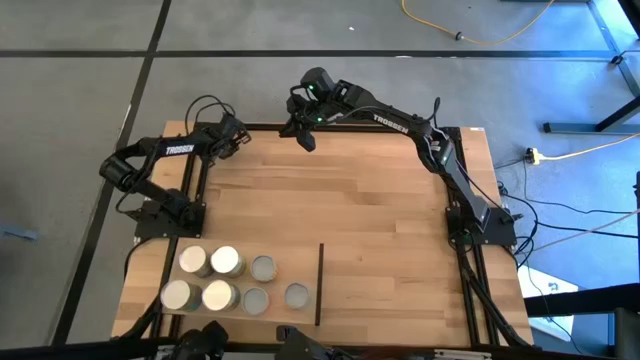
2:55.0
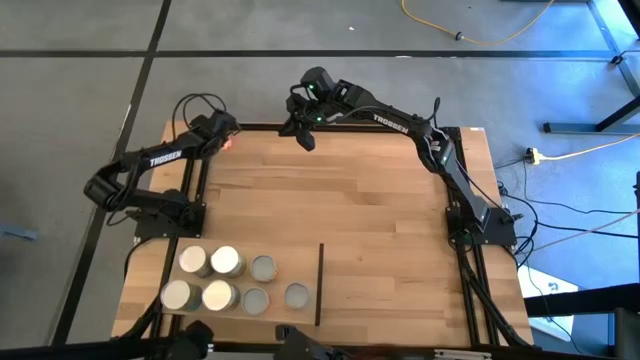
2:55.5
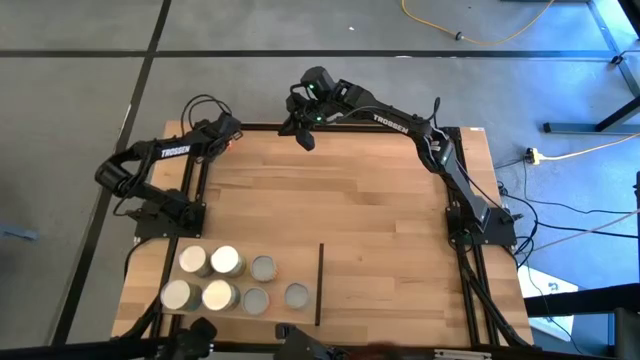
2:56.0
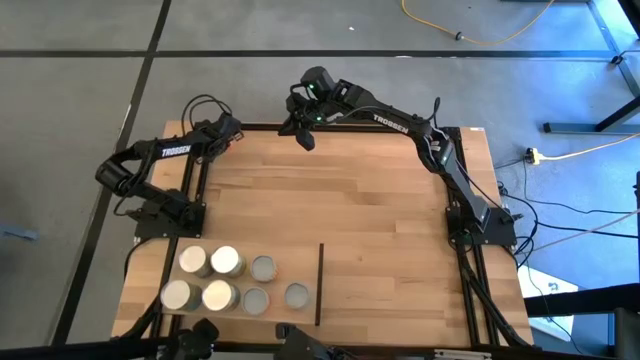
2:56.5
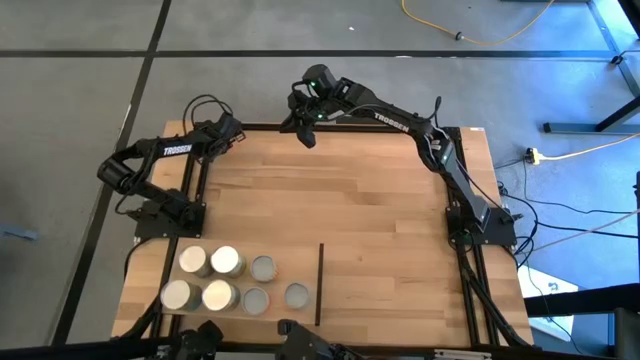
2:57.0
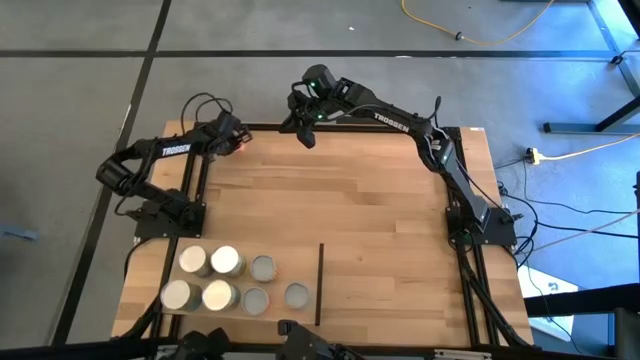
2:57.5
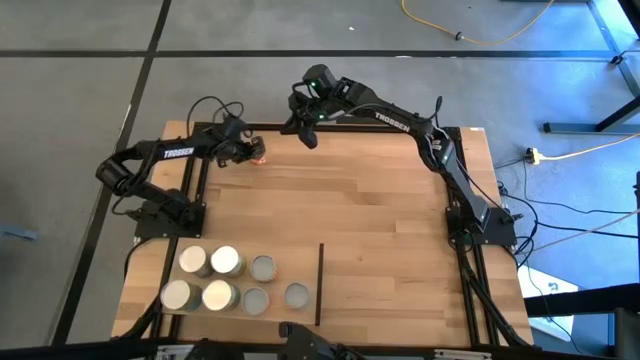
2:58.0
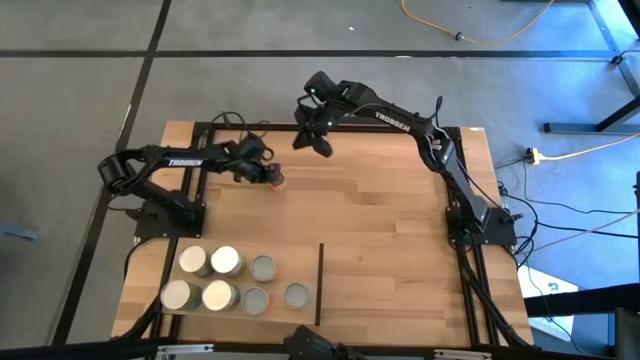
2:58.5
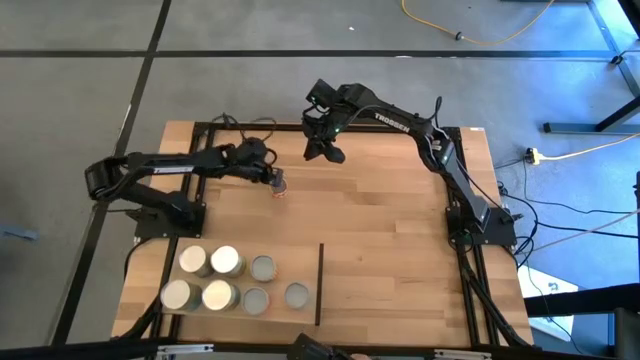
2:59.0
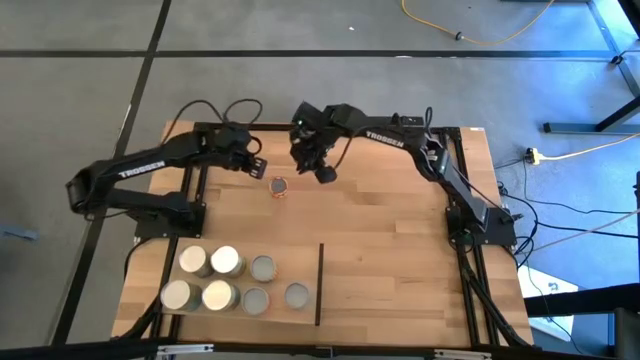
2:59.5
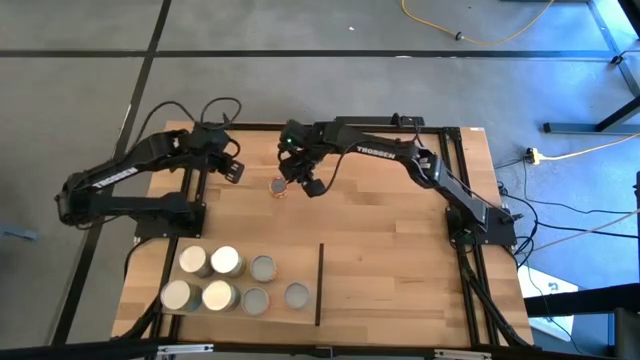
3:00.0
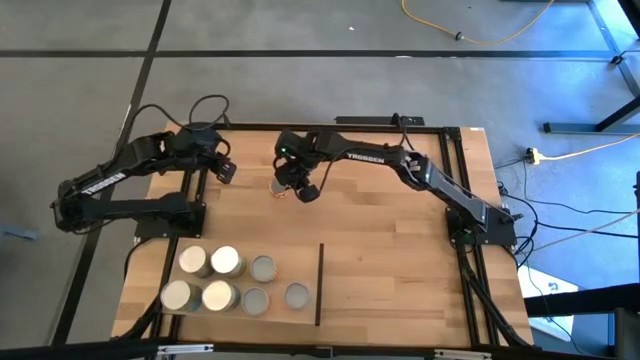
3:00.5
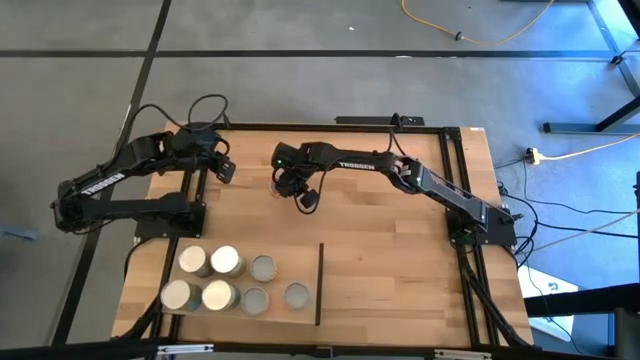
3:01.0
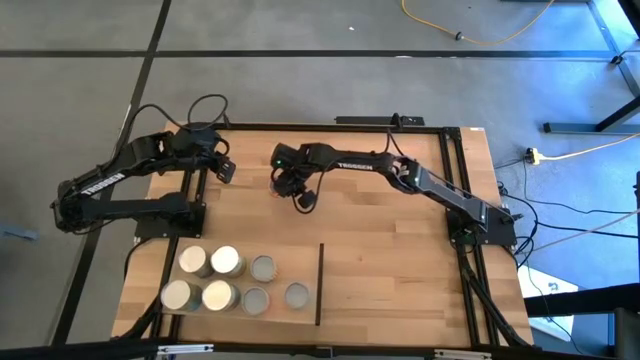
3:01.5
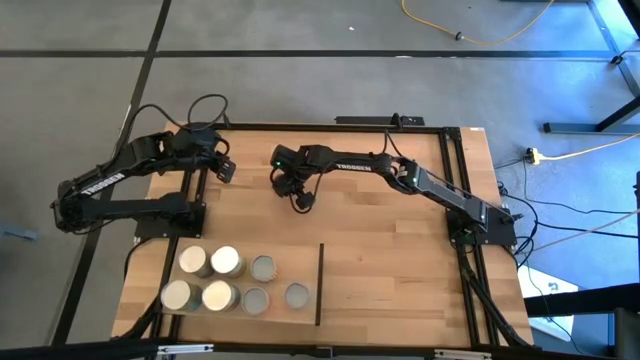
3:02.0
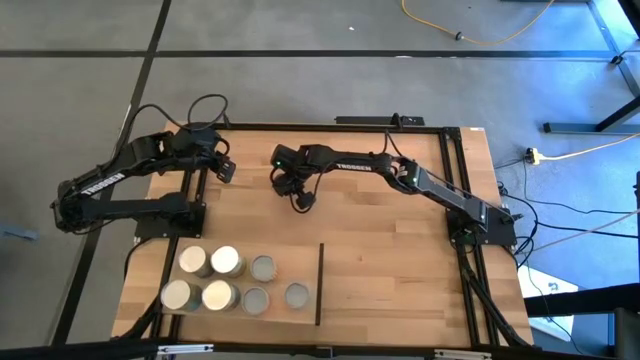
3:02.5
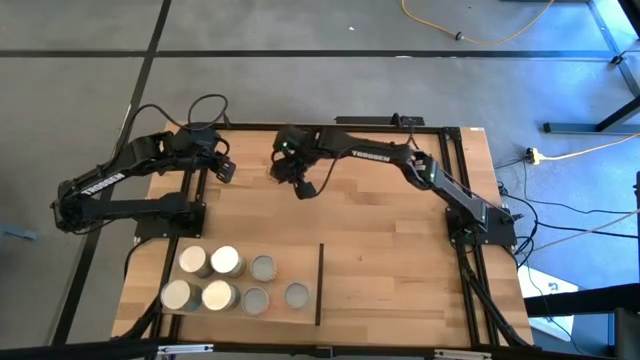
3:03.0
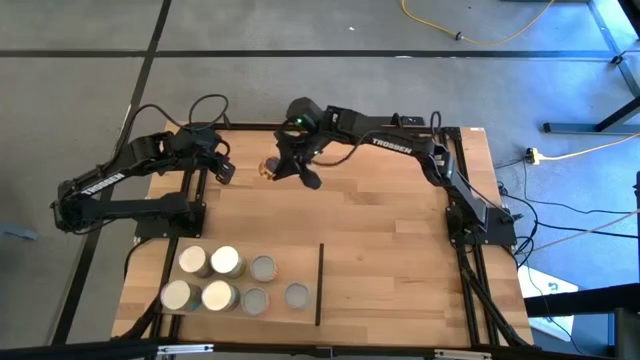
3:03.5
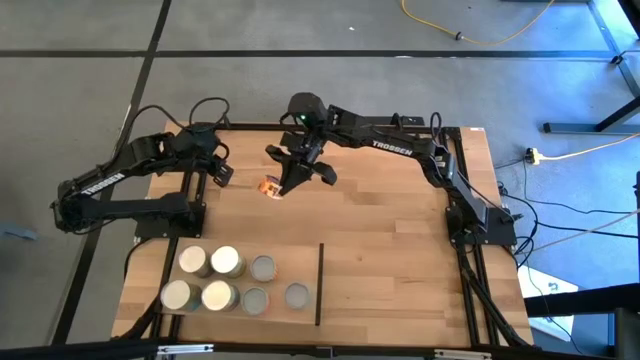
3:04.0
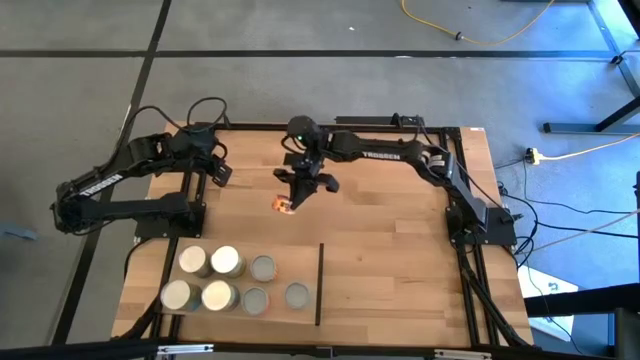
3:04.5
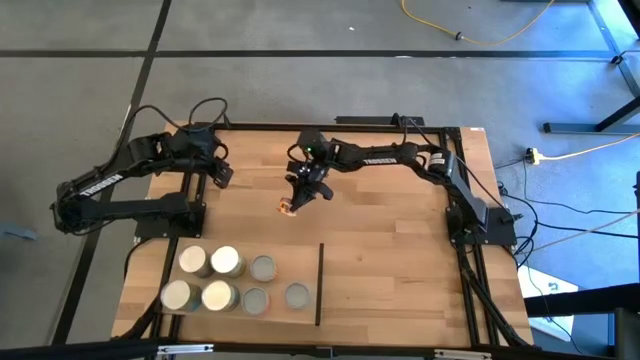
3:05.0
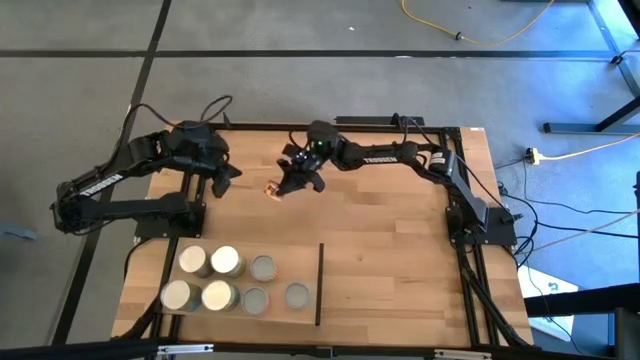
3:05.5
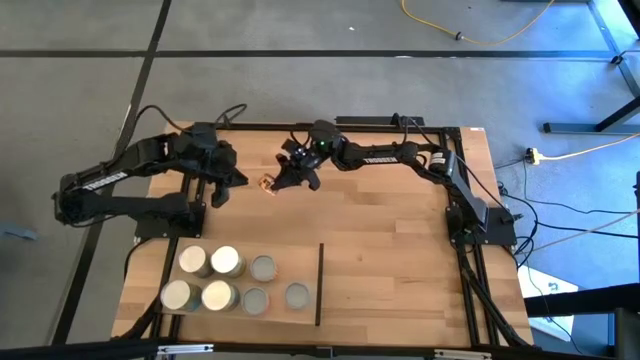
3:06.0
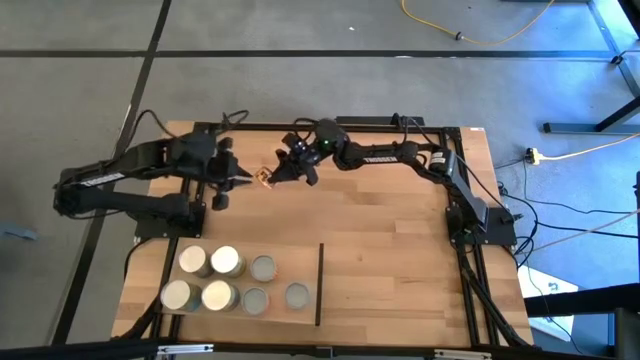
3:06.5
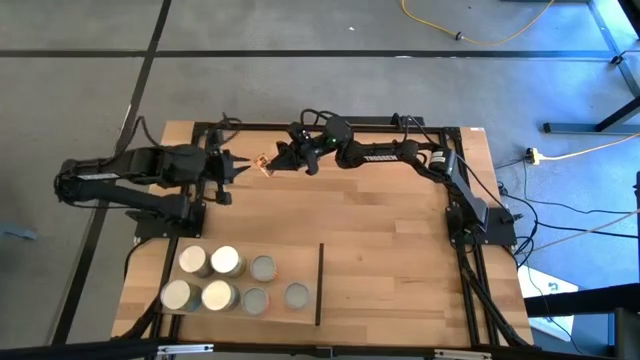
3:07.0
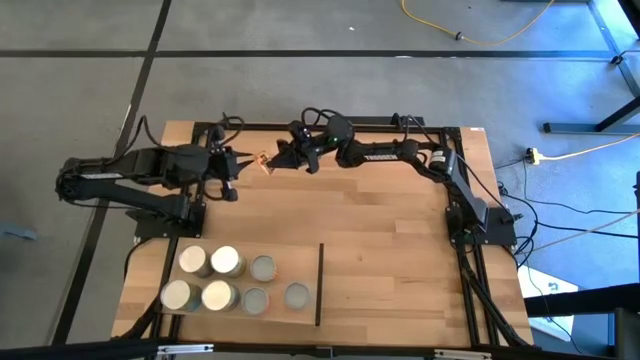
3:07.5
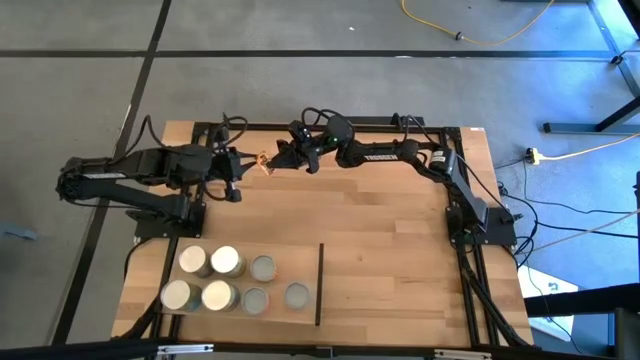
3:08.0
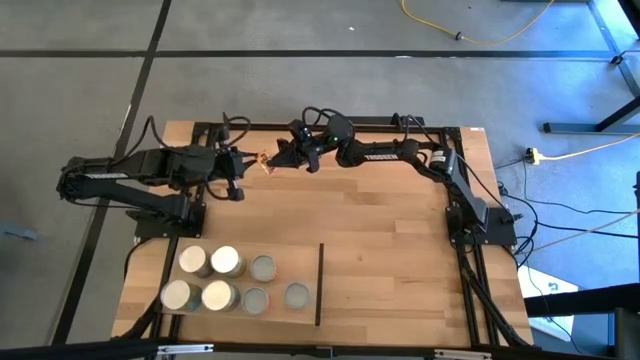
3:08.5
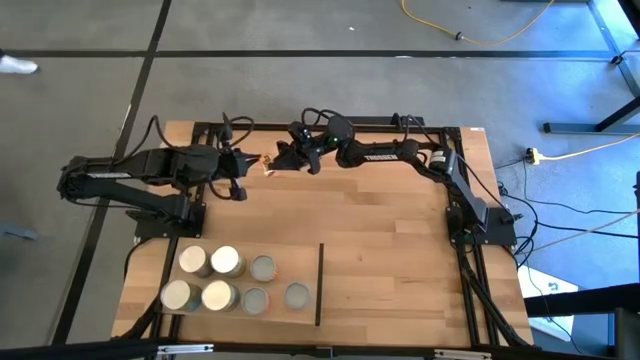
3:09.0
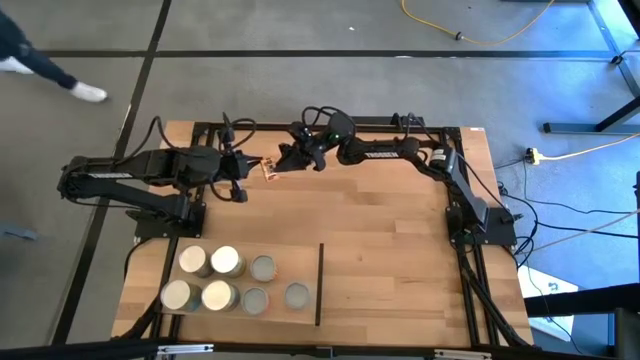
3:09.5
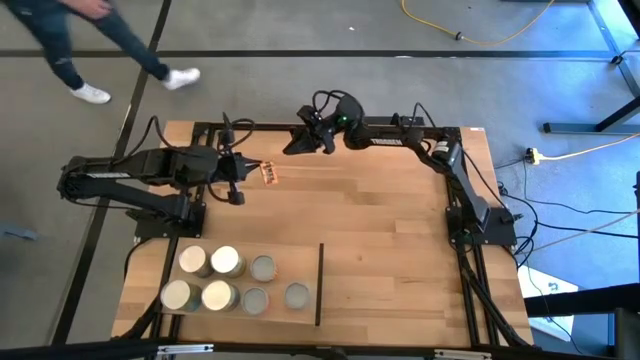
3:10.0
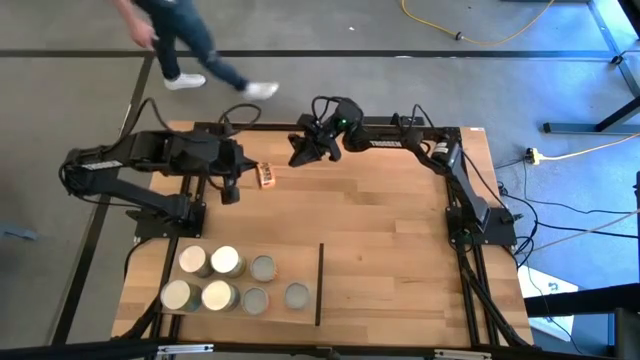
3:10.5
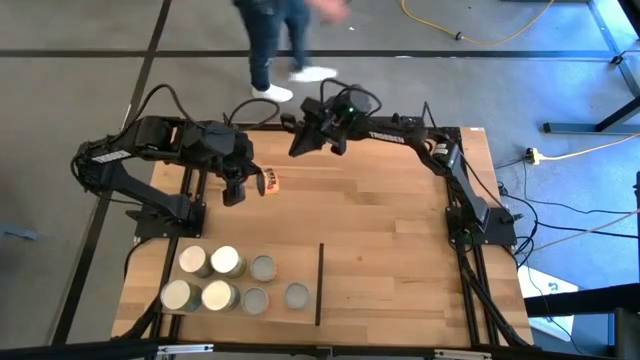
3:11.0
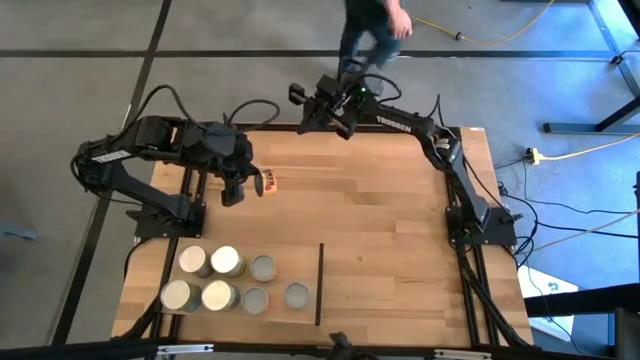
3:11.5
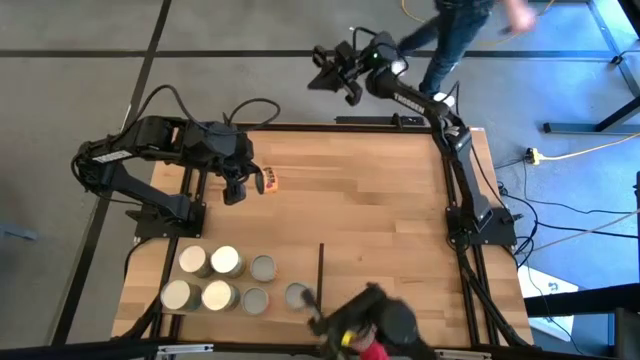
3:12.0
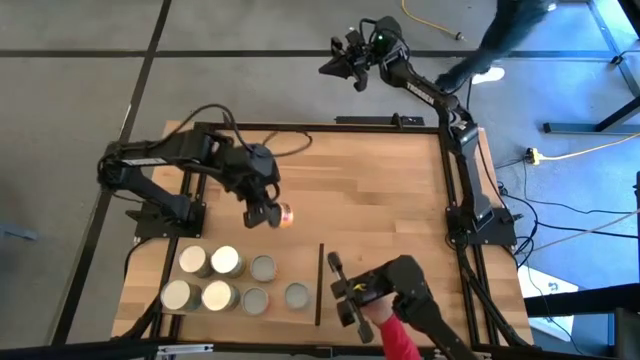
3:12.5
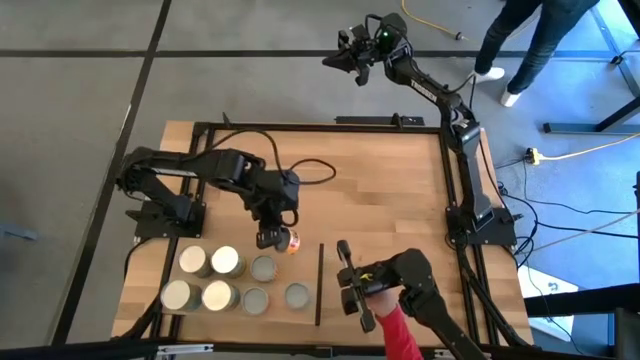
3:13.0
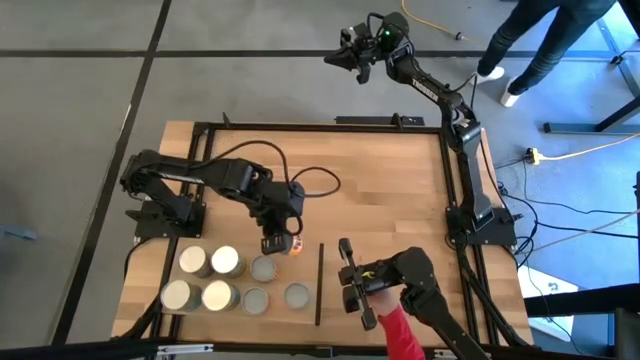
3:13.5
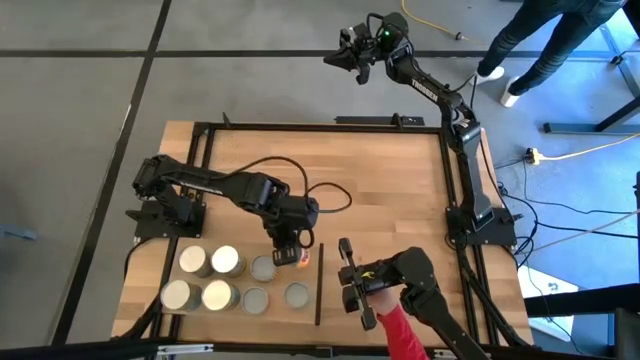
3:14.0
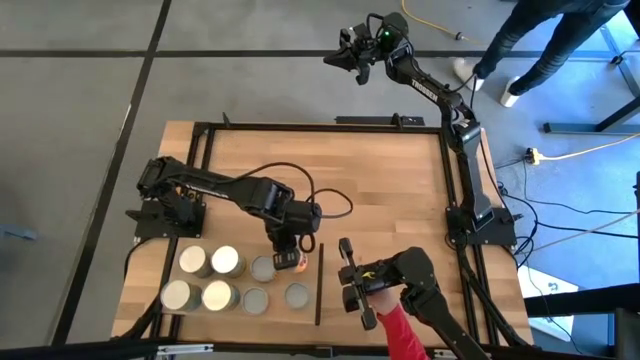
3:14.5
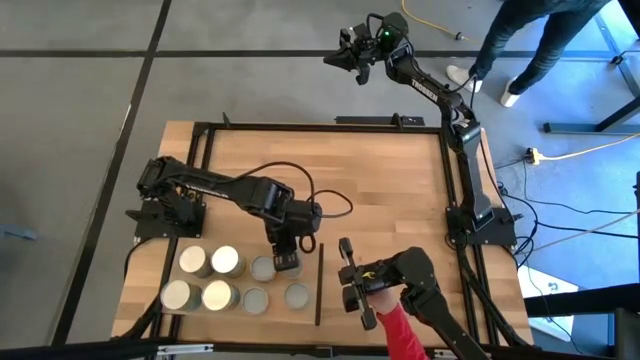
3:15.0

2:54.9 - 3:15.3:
Task: Pick and place cans onto a shelf
Put the canned pineapple rings on the shelf

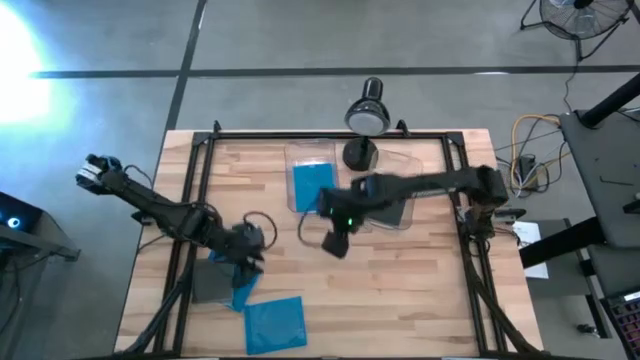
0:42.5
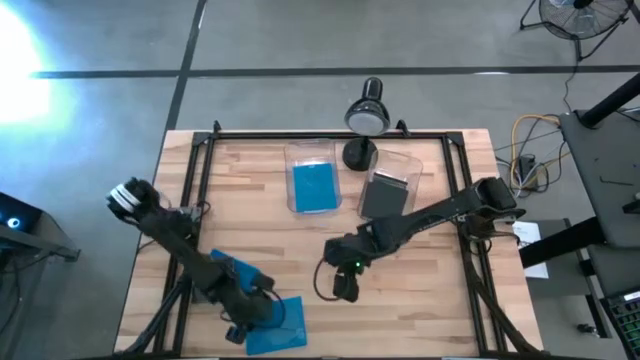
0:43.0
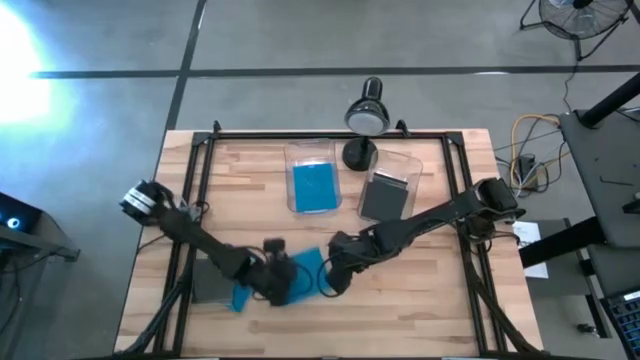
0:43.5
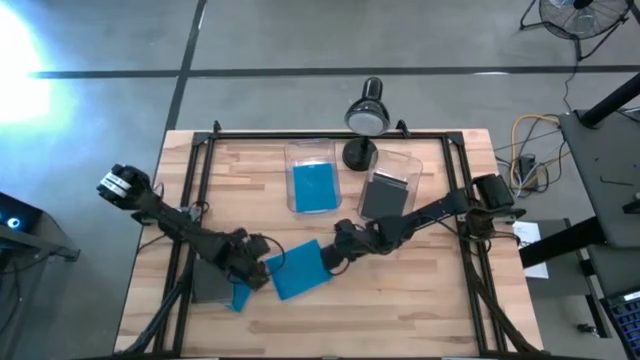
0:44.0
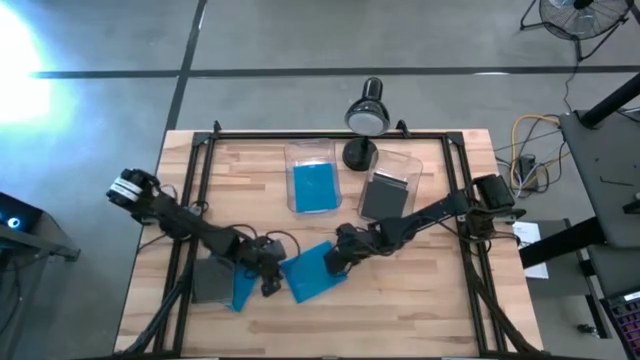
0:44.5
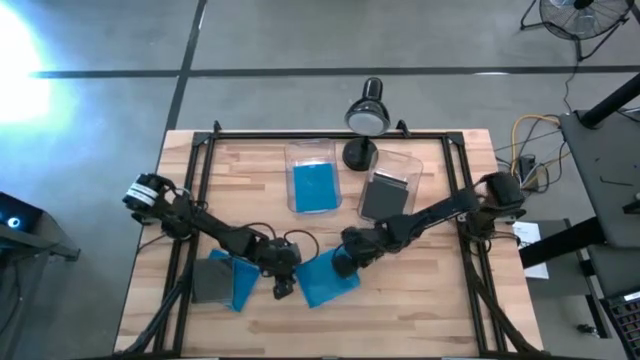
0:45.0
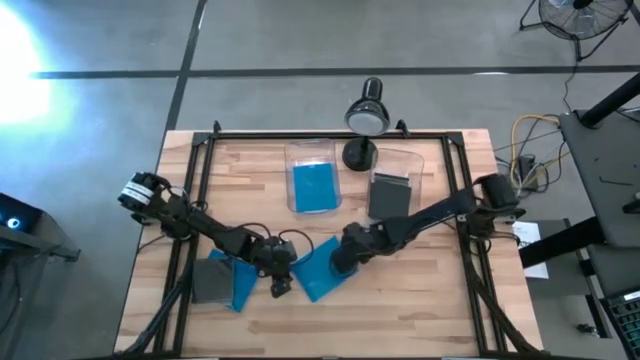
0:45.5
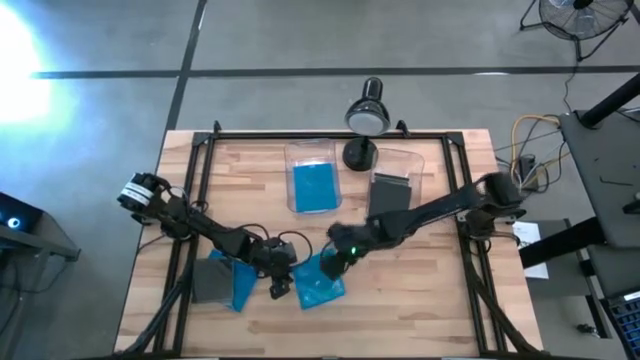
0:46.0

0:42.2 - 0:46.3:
Task: Pick & place jewel cases by type
Put the blue CD case into the left transparent bin
